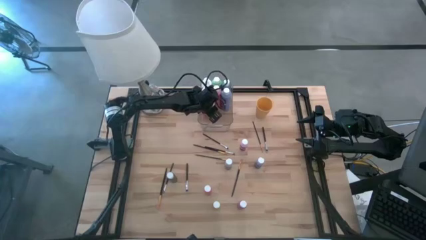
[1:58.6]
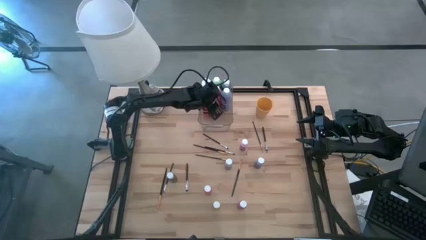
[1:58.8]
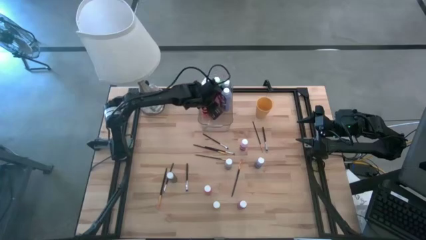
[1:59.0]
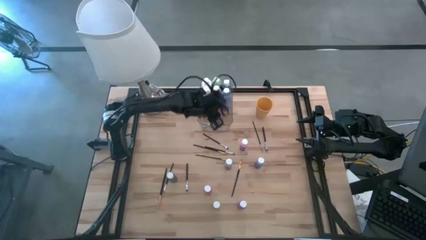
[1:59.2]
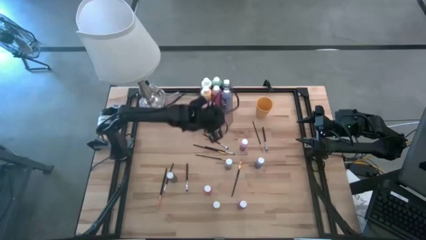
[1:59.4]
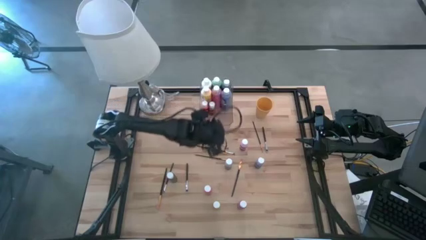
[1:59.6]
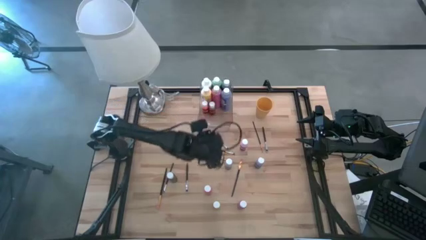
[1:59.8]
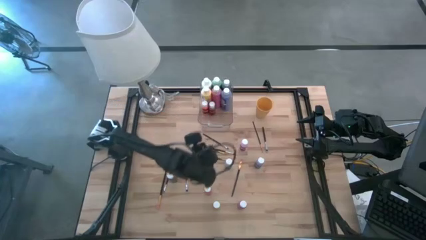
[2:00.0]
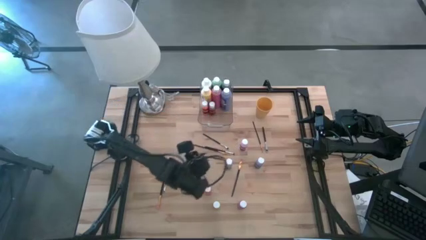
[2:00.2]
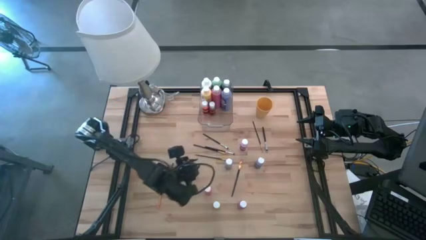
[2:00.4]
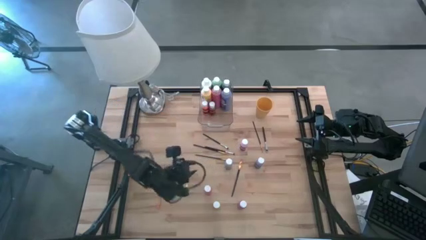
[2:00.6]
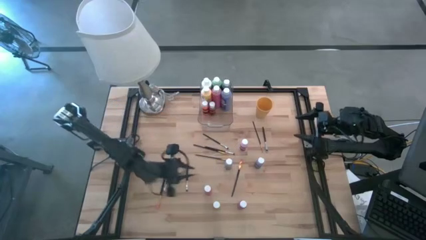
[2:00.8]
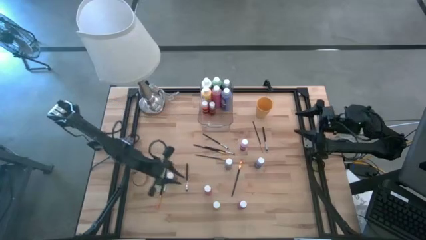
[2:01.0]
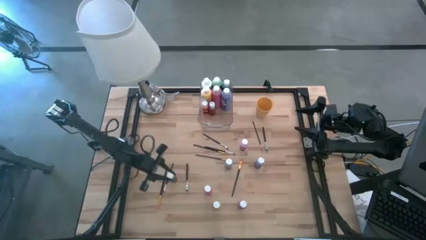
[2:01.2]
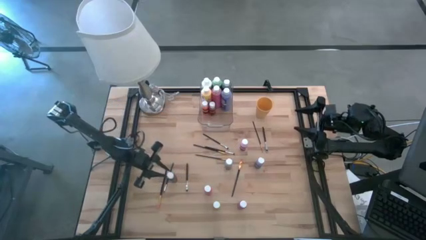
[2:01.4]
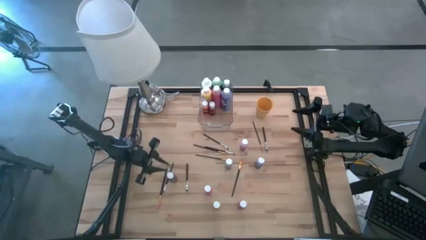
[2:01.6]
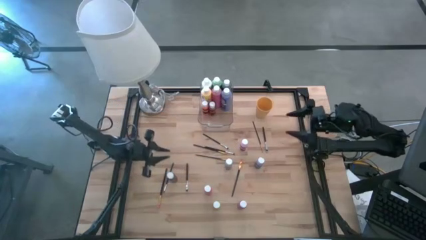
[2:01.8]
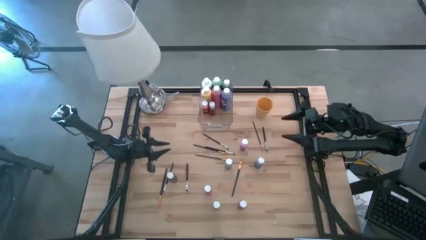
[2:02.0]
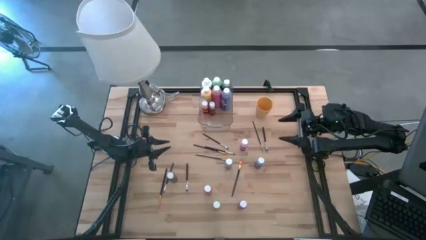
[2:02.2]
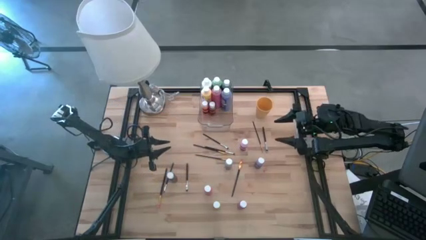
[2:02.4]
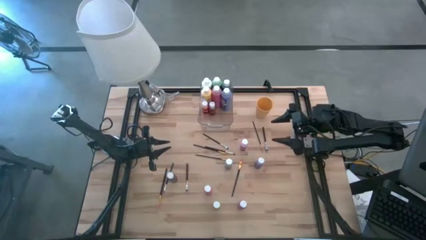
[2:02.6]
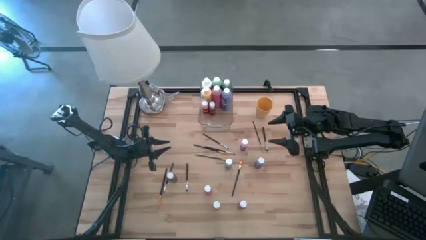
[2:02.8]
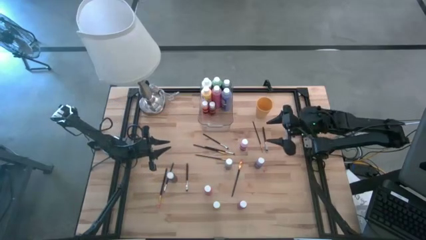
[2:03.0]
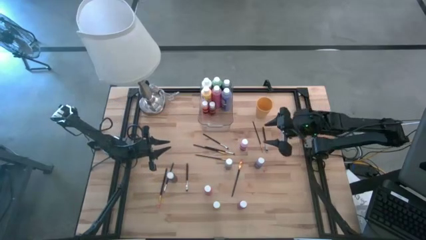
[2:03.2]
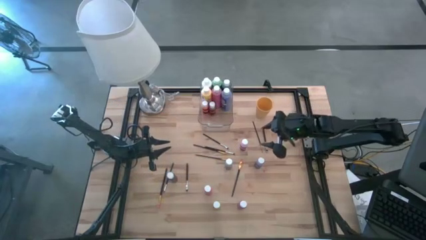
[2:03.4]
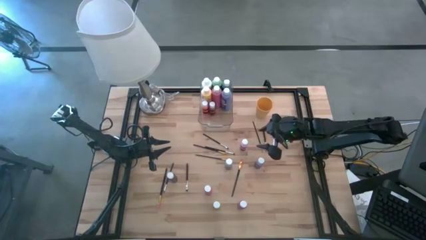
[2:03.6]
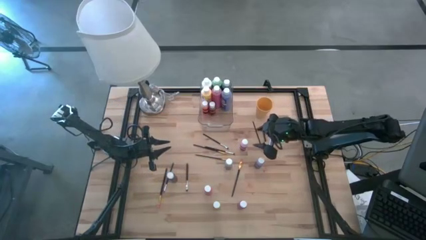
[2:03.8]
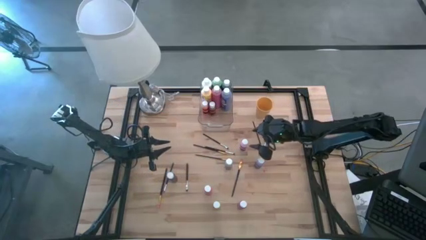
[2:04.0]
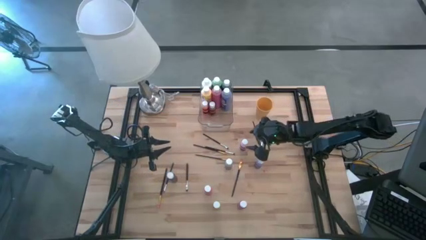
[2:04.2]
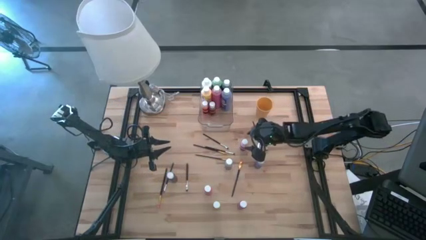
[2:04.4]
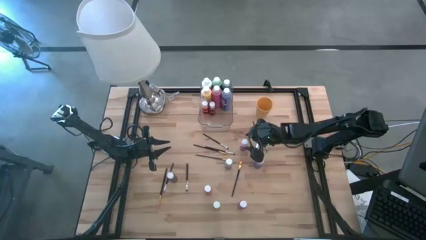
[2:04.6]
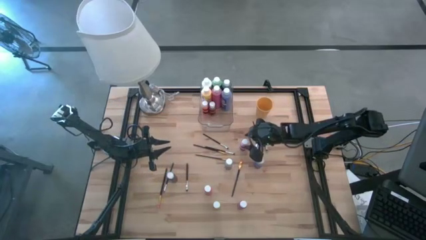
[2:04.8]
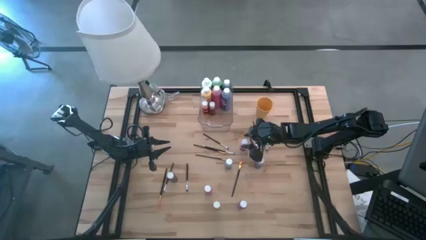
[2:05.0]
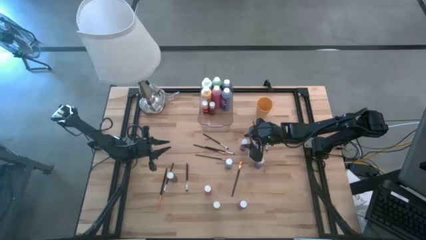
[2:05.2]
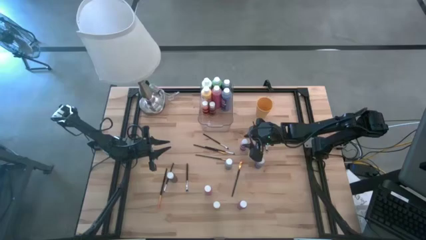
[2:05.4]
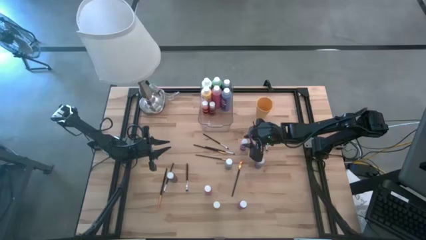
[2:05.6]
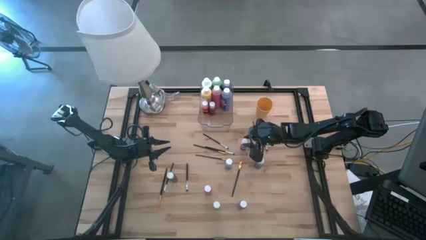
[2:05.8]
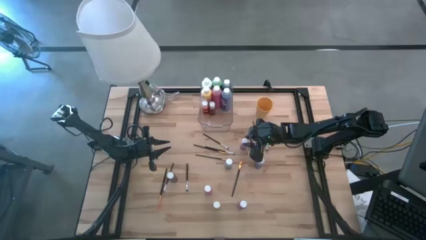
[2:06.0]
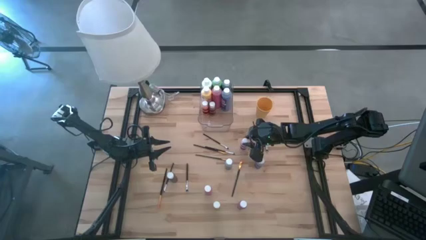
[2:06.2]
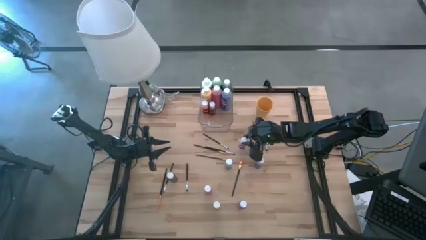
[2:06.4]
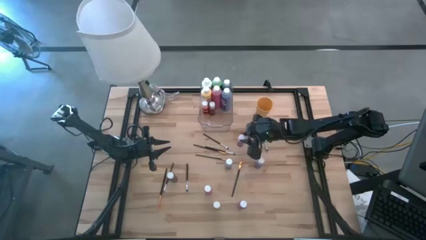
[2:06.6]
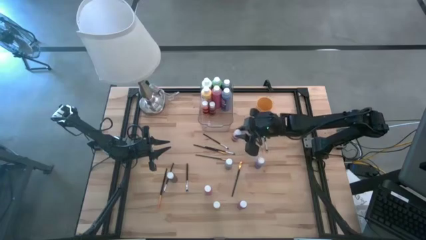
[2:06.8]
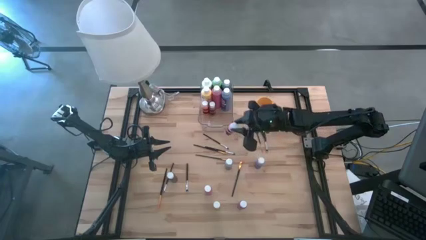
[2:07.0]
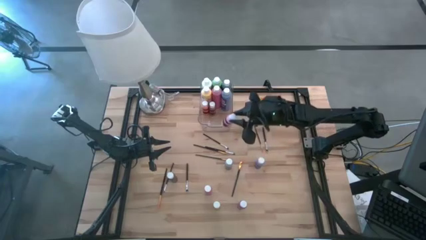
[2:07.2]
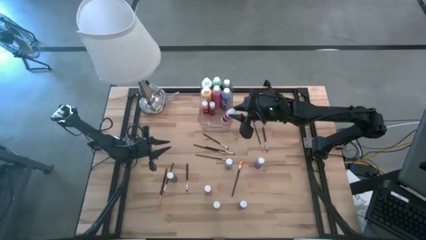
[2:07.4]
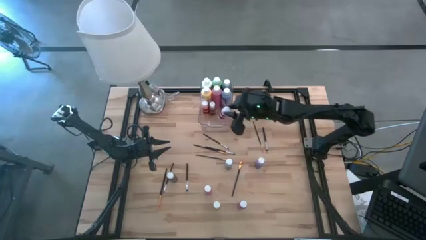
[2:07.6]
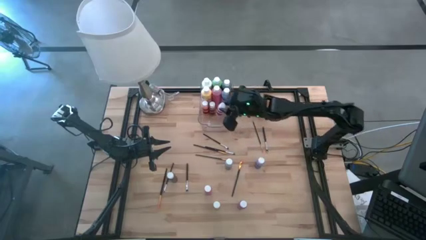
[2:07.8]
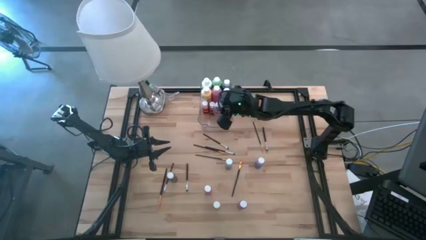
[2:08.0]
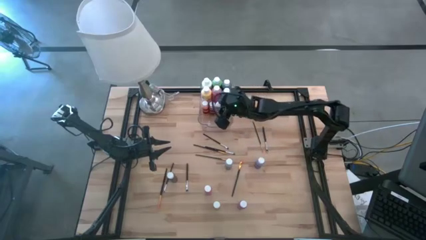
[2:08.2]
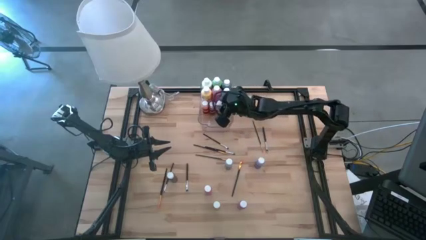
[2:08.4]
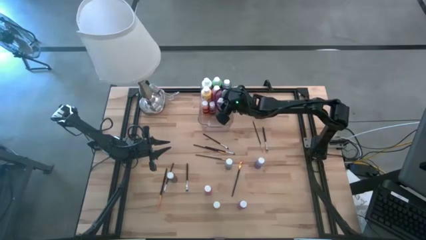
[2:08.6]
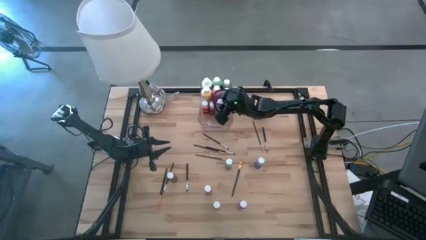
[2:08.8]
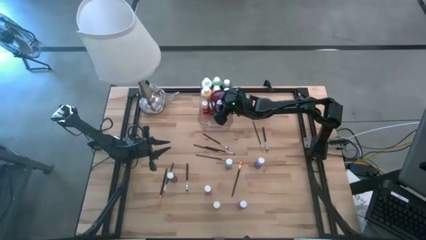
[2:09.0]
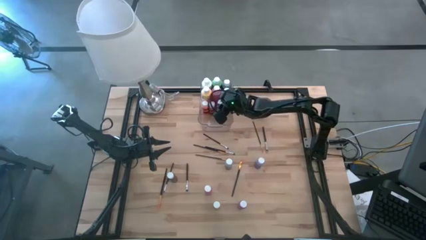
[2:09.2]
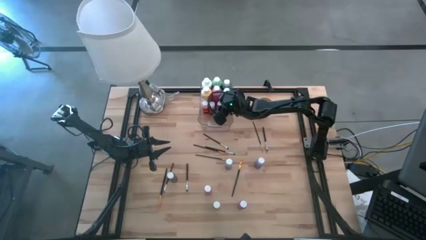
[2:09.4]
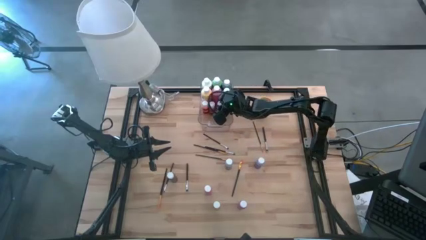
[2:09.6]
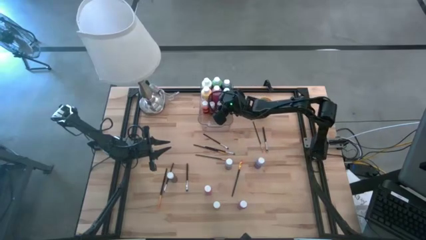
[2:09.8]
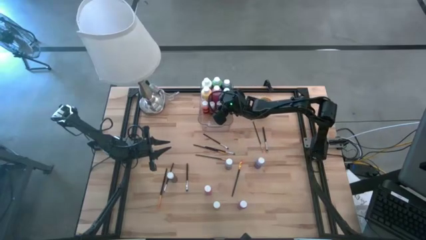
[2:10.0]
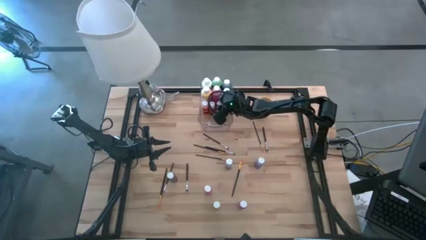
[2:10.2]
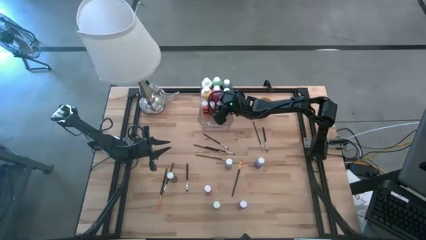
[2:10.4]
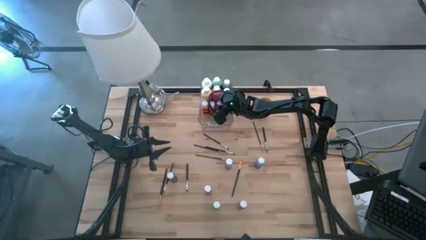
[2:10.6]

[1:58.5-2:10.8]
Task: Pick & Place Paint Supplies
Put the small pink paint bottle into the bin

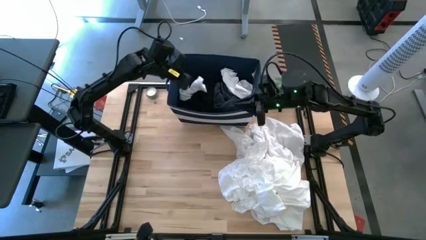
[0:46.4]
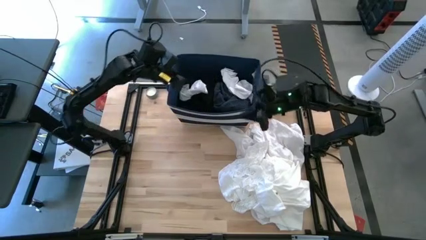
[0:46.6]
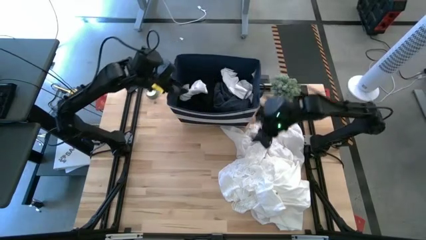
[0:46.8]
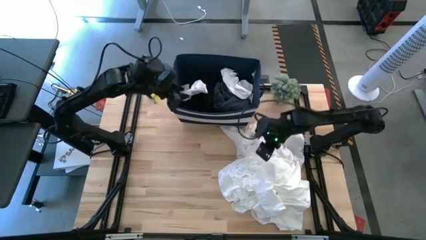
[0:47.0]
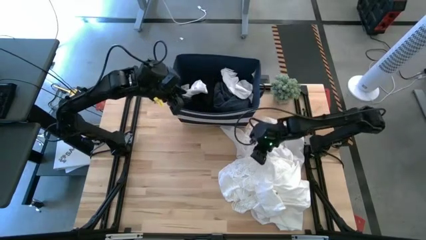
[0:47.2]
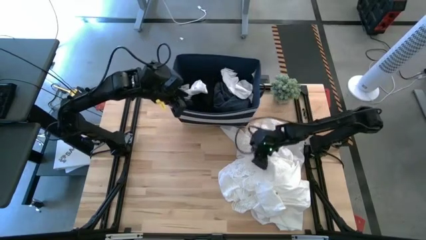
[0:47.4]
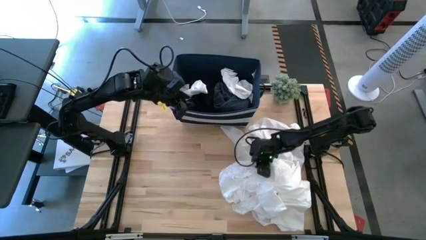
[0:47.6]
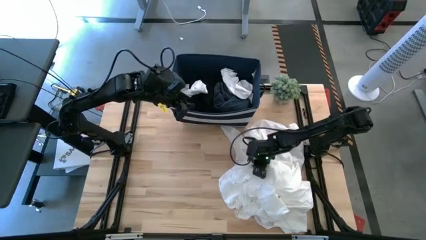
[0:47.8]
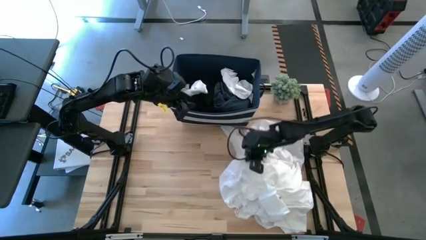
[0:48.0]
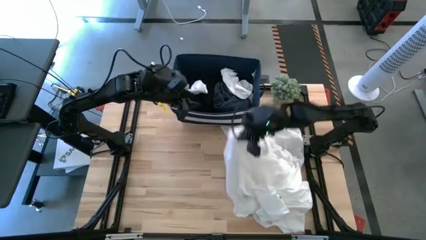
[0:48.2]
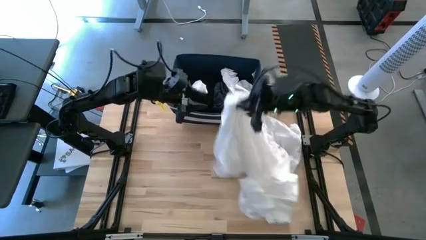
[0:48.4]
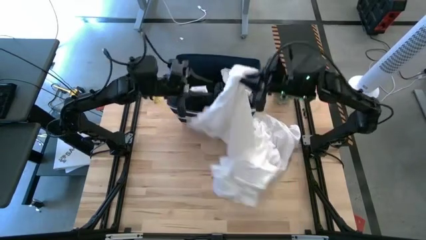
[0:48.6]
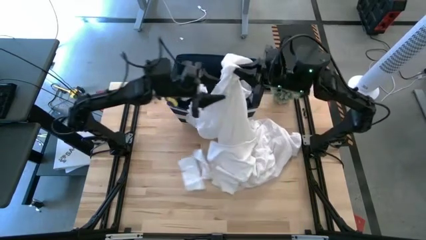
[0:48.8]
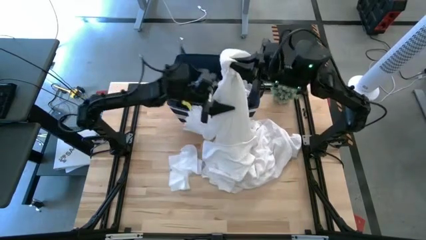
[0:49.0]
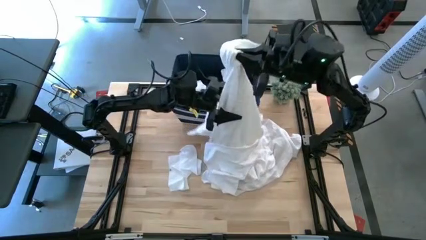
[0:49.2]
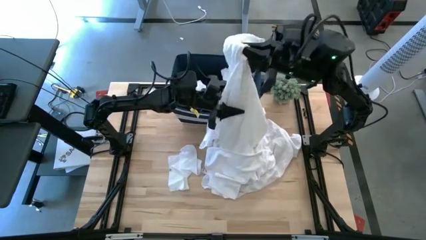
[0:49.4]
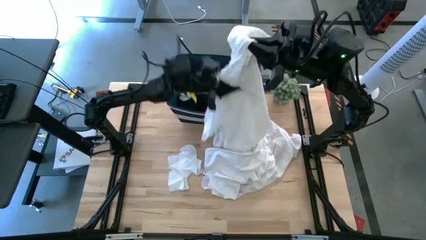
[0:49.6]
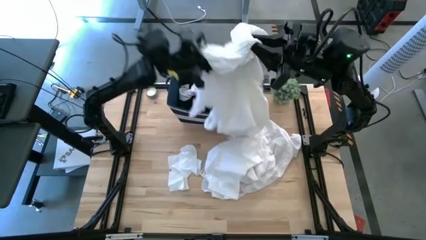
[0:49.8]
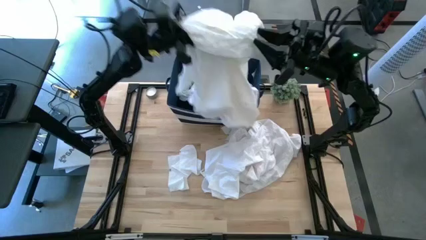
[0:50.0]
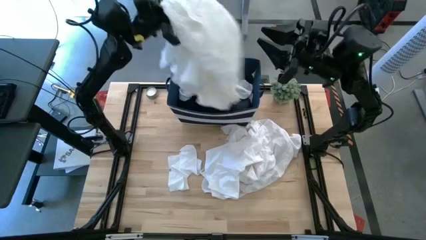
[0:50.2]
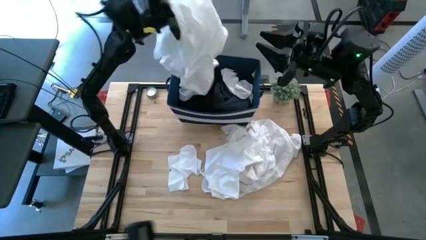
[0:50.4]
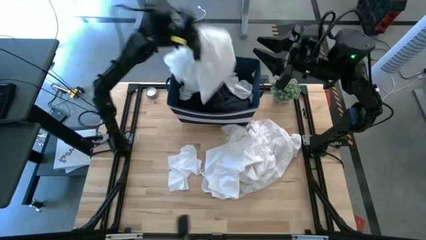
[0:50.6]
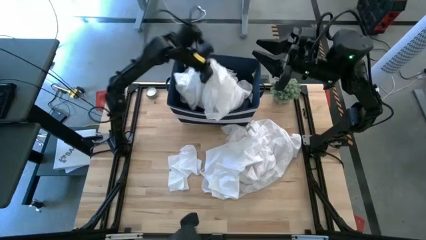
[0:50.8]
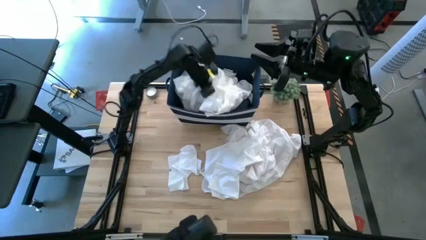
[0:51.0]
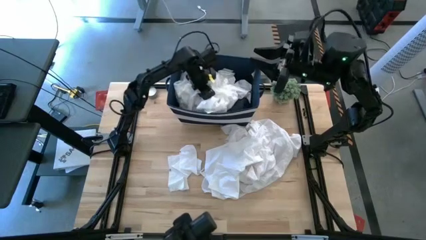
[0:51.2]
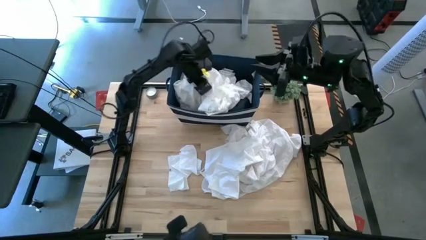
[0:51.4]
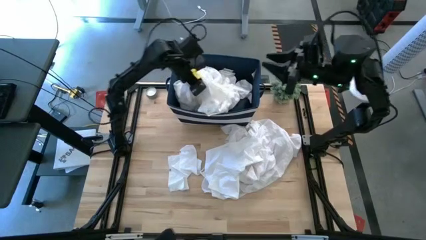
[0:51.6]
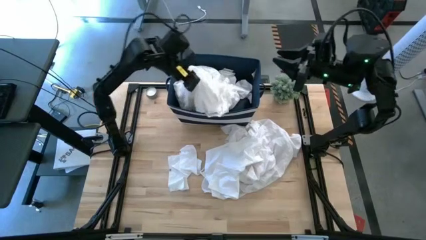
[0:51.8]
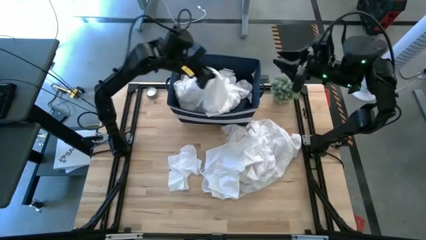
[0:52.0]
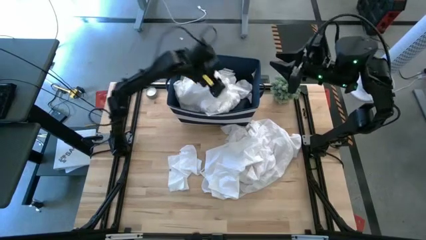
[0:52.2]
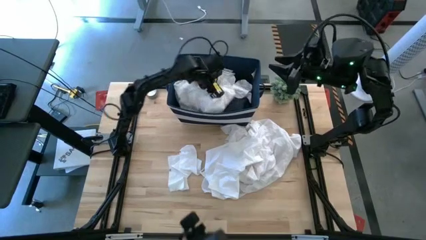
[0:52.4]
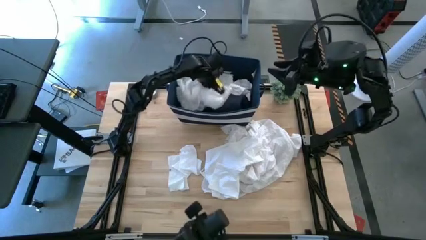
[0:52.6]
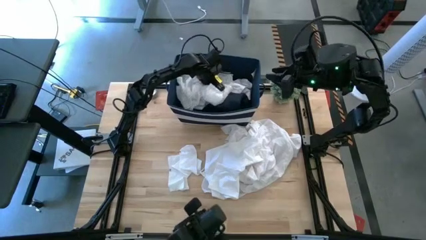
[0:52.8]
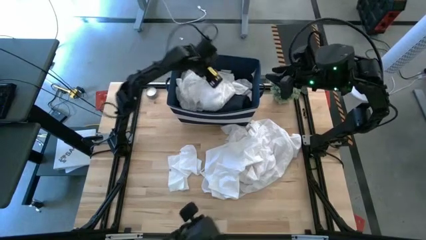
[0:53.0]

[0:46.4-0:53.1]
Task: Sort clothes
Put the top white shirt into the blue bin
